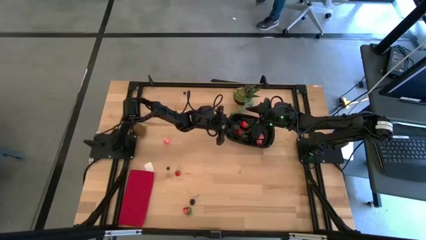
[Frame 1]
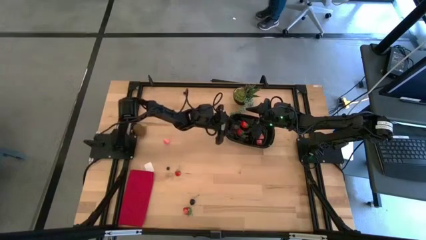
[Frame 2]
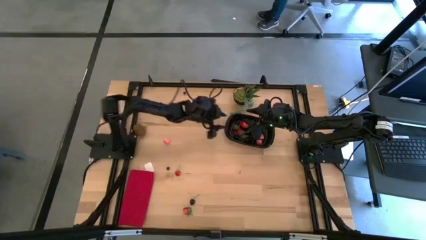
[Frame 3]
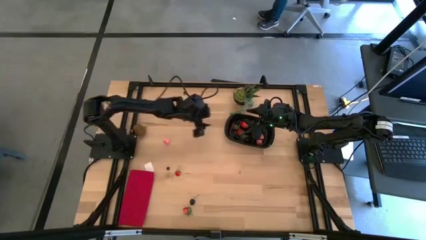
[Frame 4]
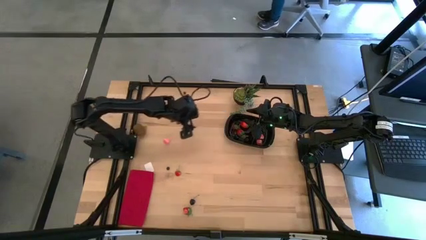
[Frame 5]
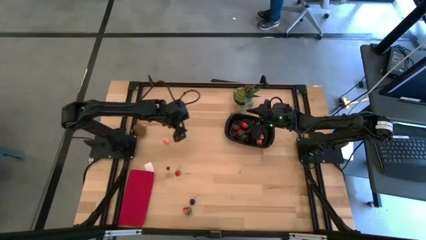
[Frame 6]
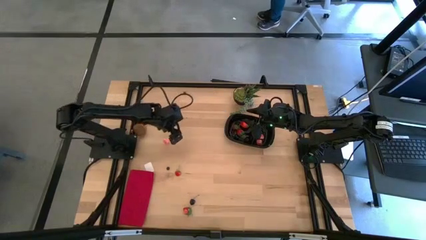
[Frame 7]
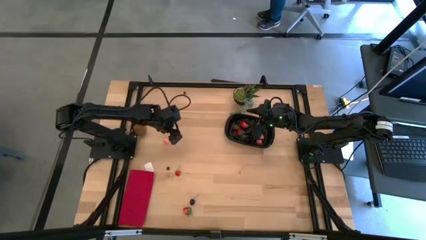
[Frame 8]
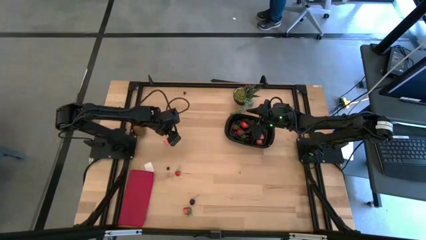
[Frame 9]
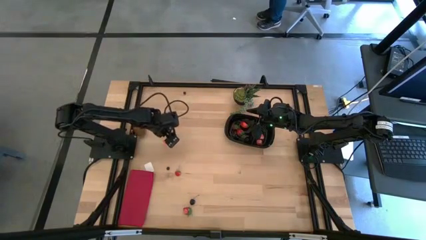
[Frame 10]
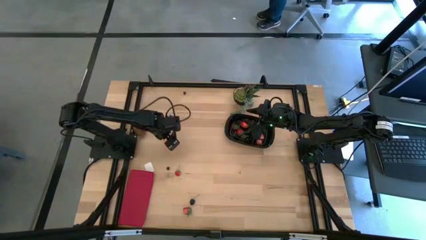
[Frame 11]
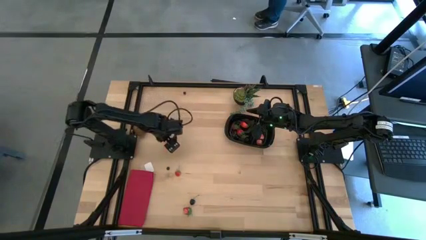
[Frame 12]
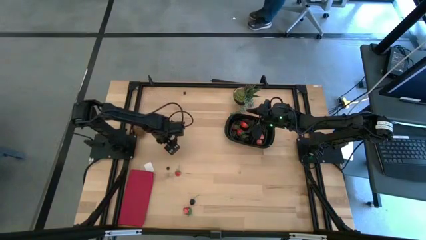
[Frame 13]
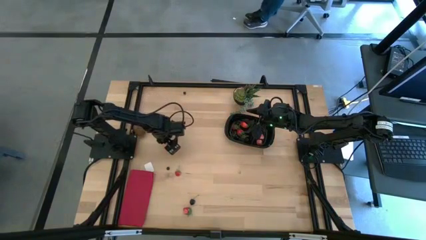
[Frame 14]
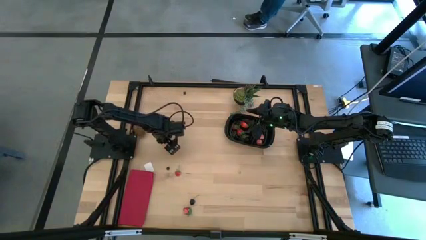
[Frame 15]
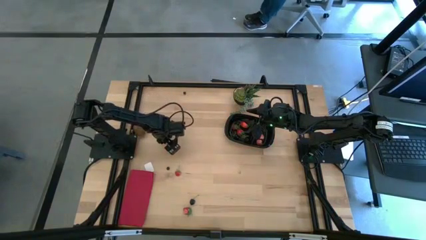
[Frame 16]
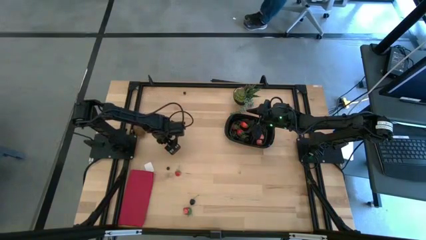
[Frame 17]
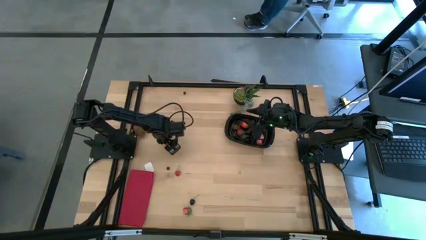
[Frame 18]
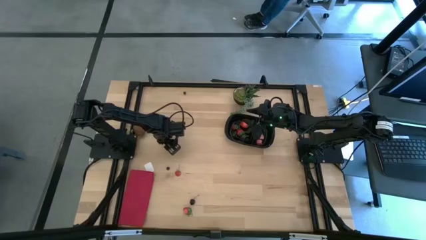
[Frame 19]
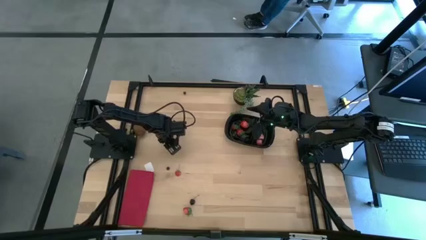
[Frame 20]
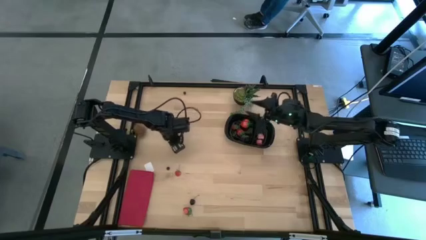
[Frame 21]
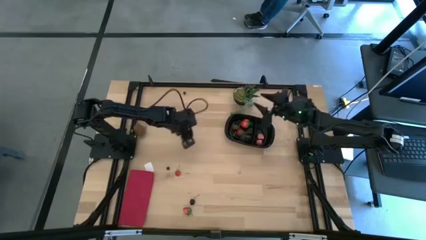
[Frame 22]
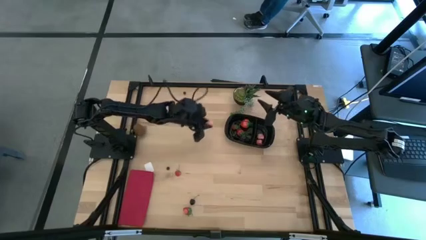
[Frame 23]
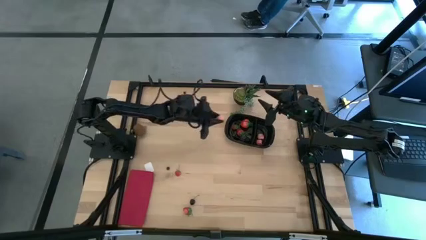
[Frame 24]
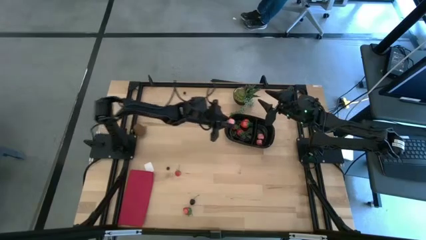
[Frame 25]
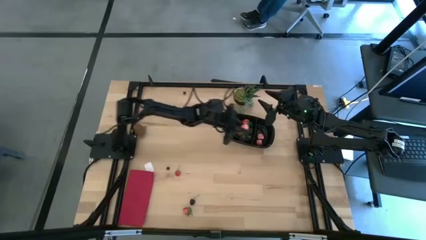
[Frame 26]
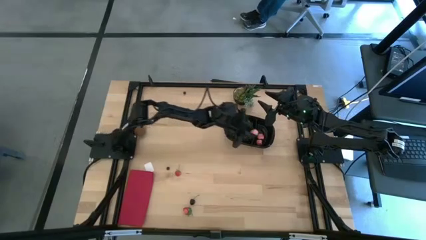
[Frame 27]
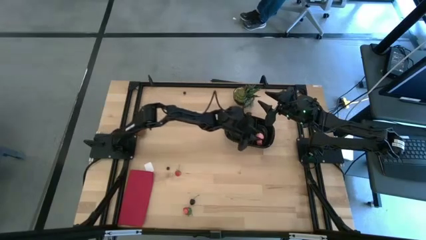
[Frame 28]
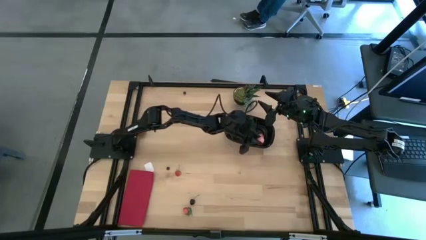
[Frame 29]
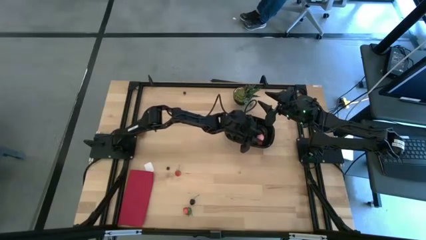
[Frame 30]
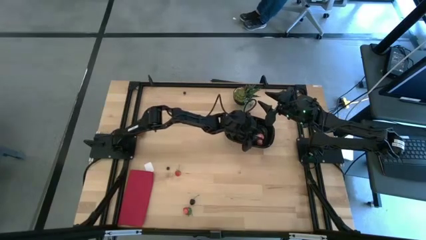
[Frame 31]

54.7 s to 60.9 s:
Task: Pick and placing Produce into tupperware
Put the pink peach into the of the black bin

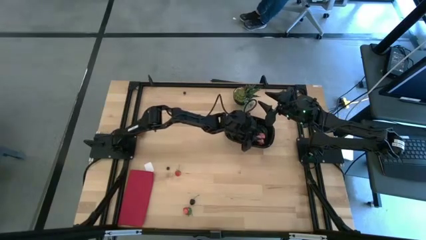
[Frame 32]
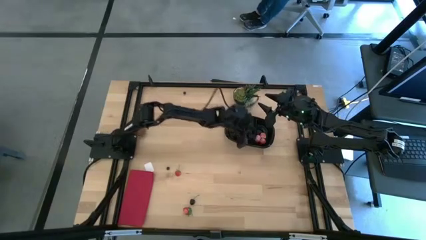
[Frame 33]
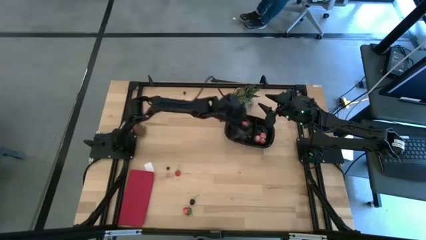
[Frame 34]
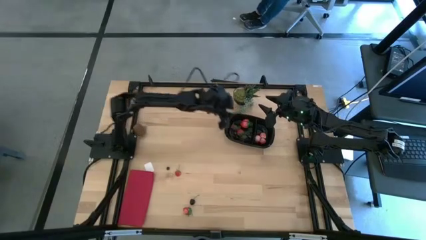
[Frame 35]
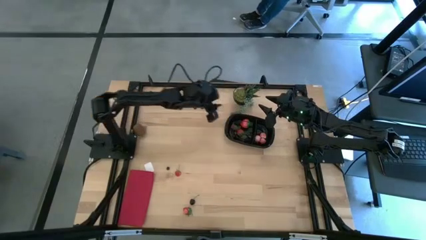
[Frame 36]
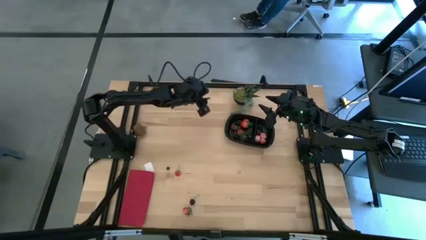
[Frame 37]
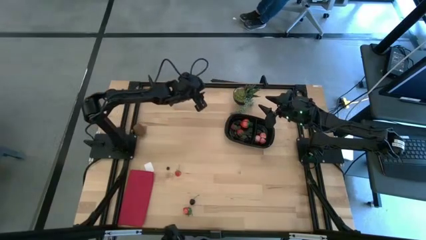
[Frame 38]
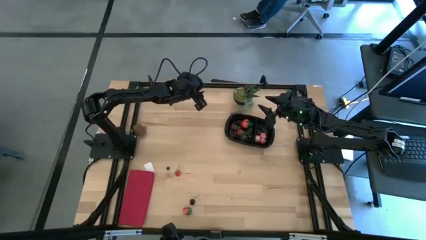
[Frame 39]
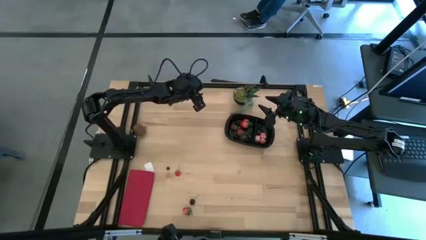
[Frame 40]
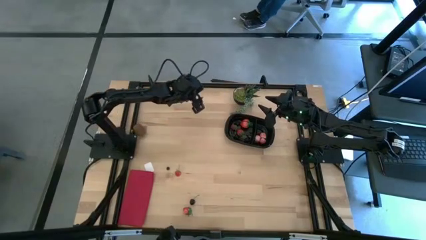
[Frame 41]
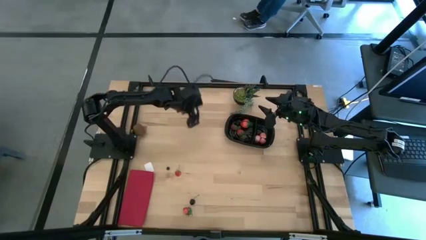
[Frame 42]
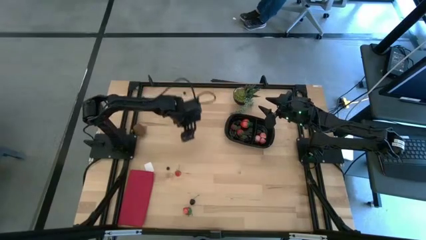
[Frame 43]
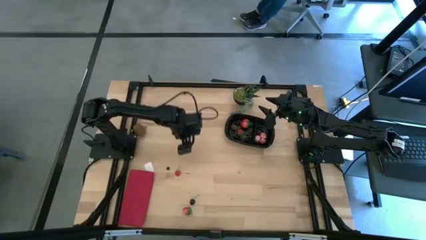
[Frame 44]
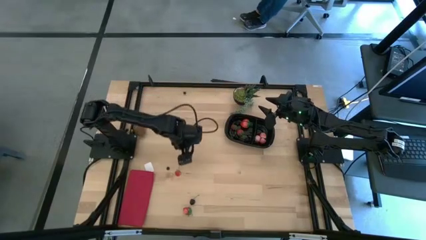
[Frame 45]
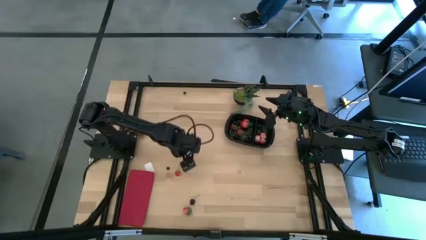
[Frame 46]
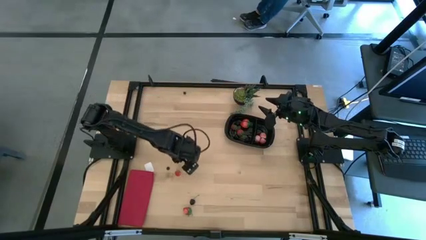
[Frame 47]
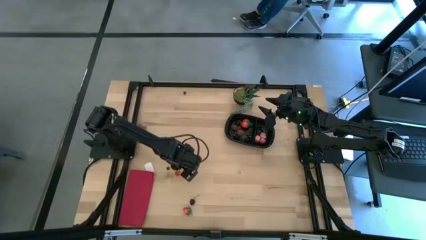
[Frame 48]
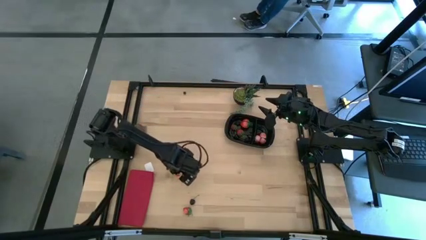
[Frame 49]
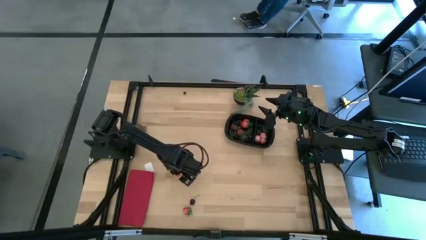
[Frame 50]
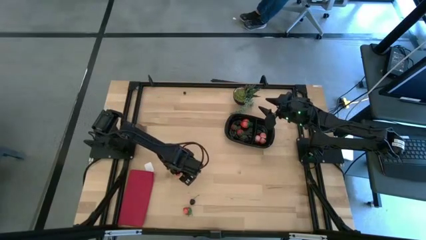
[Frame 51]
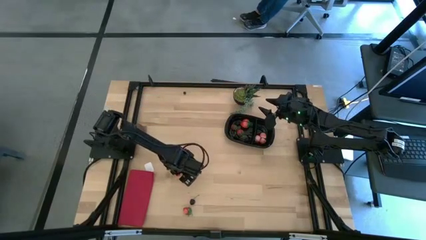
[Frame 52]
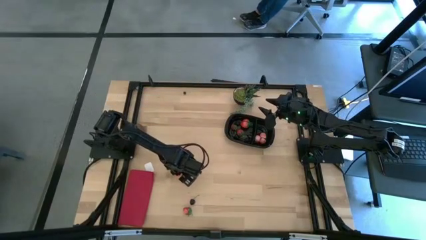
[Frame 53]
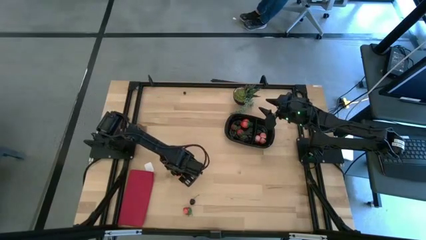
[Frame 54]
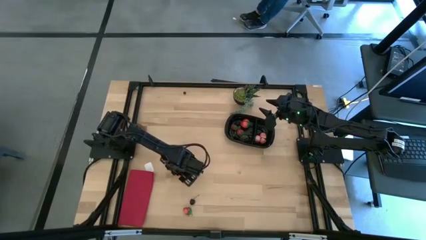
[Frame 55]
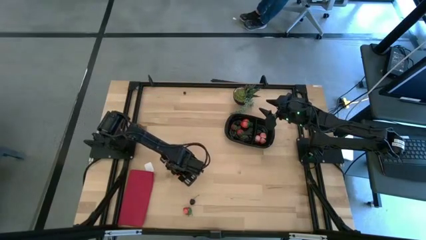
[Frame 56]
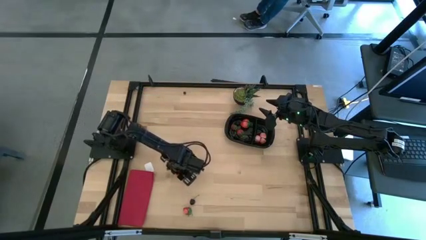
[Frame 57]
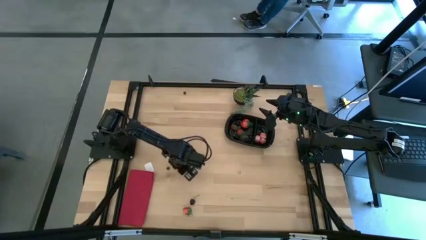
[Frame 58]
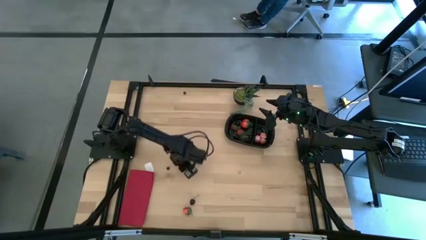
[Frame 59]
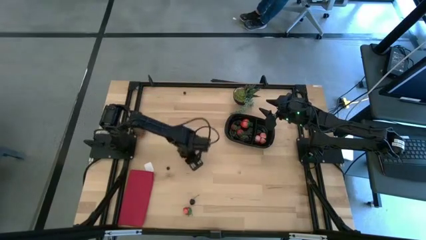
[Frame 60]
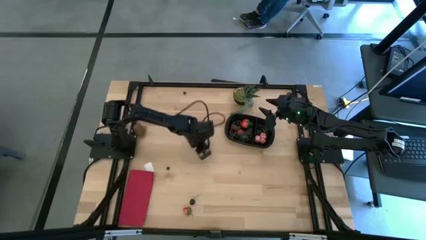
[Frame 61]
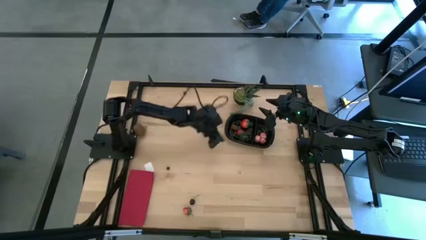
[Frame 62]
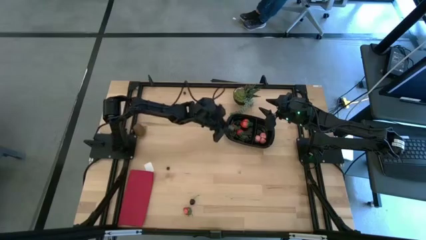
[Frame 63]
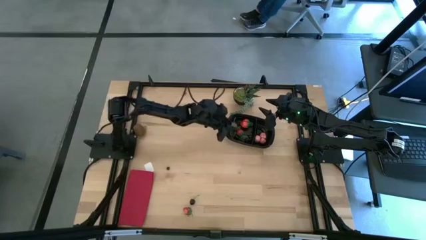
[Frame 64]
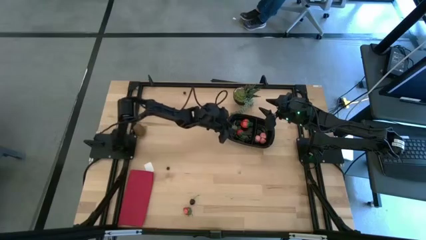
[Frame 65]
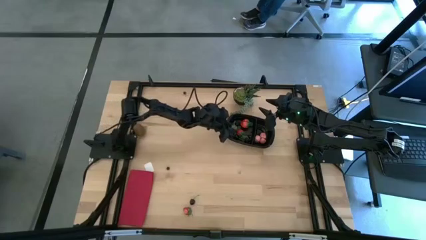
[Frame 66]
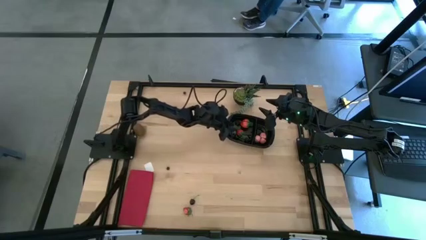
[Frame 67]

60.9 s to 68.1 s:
Put the red strawberry into the of the black bin

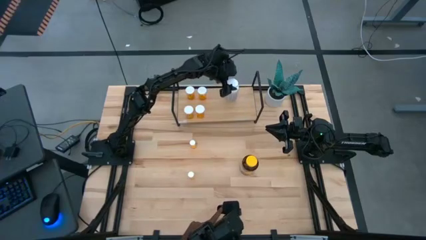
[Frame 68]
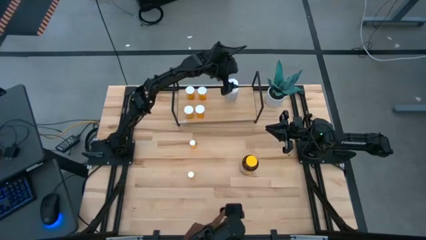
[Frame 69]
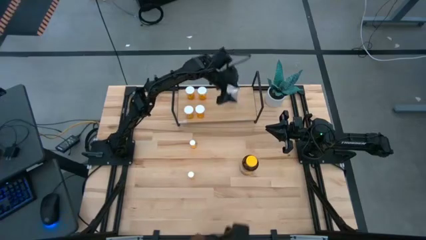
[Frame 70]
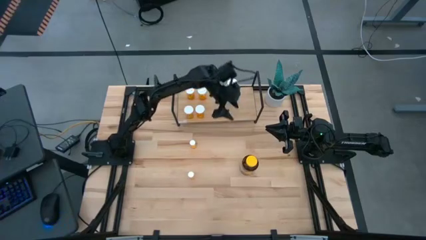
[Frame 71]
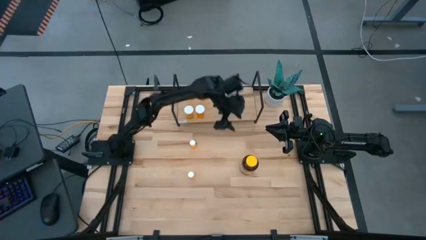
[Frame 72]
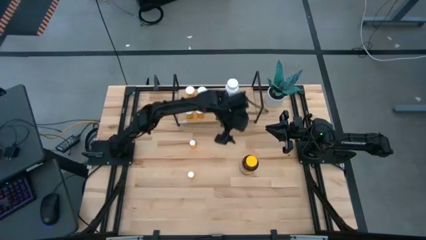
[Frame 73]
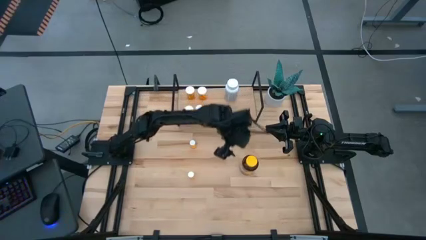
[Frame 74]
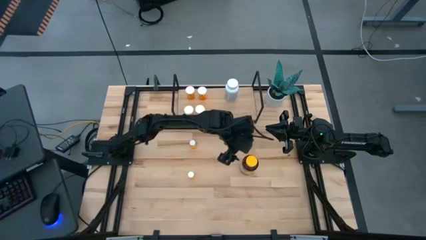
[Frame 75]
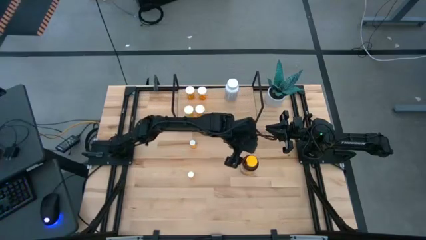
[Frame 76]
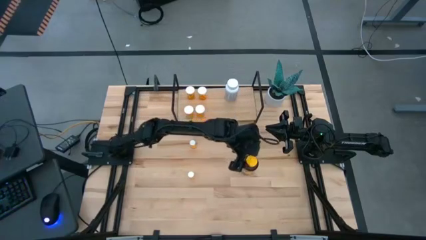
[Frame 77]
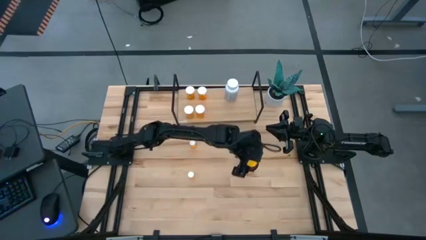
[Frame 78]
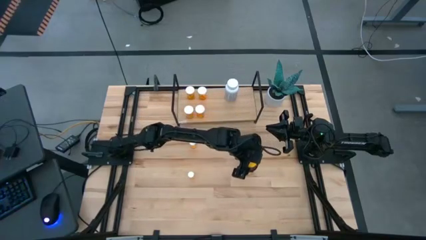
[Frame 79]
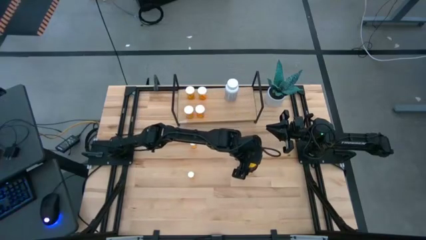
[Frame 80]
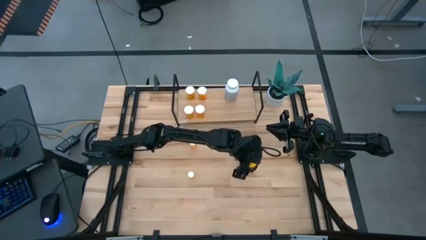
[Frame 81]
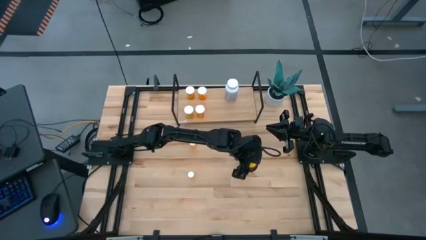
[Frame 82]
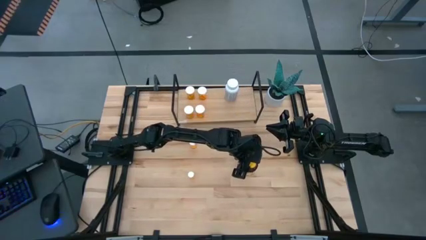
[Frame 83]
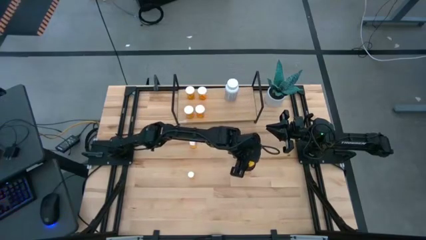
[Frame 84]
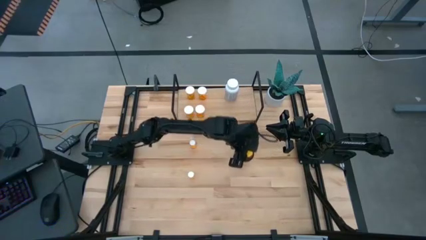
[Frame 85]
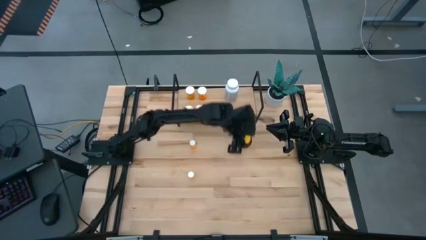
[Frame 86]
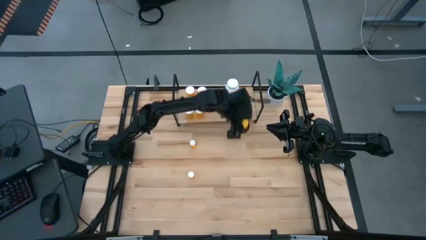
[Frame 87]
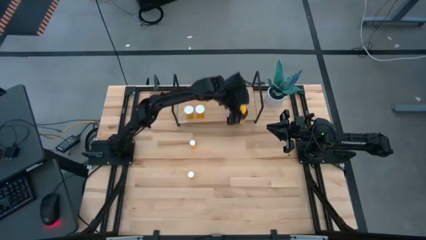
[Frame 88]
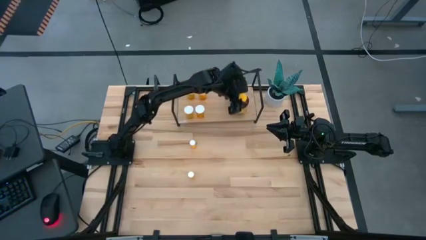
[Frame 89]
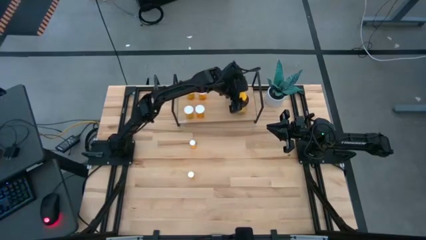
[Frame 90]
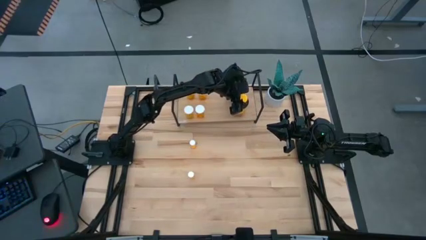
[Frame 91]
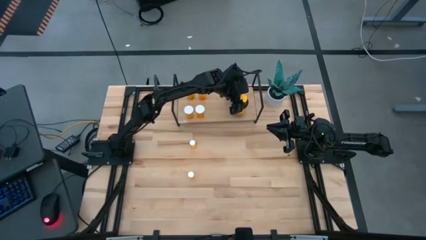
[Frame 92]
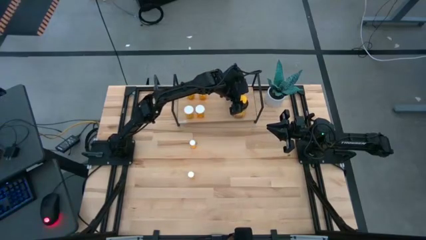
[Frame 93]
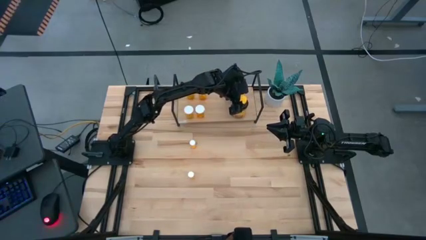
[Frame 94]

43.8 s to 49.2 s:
Task: Pick and place medicine bottles onto shelf by color
Put the yellow pill bottle on the shelf
